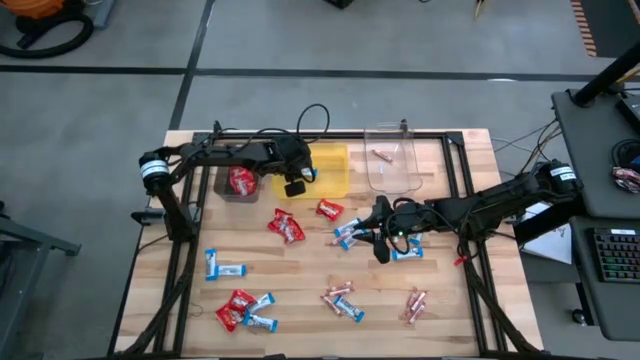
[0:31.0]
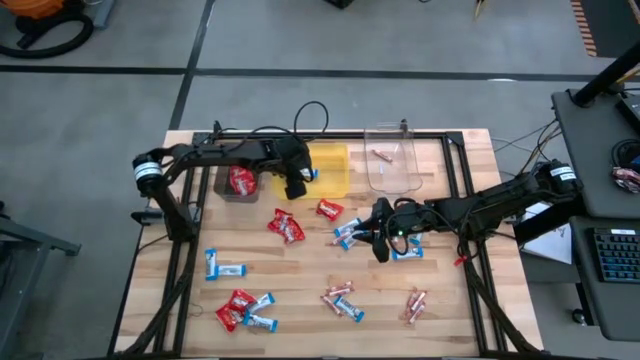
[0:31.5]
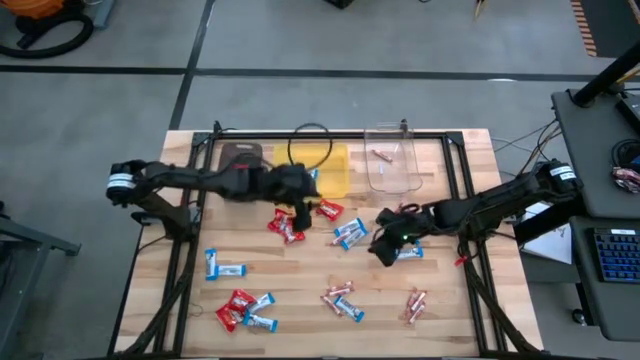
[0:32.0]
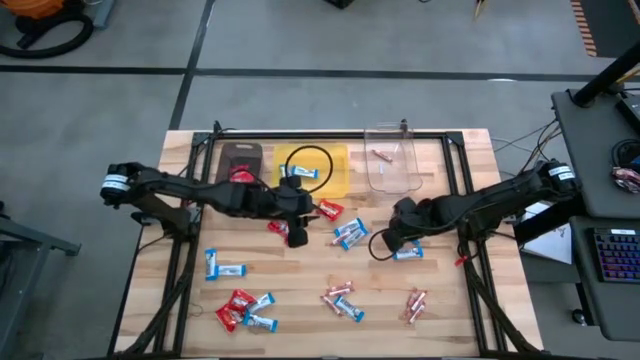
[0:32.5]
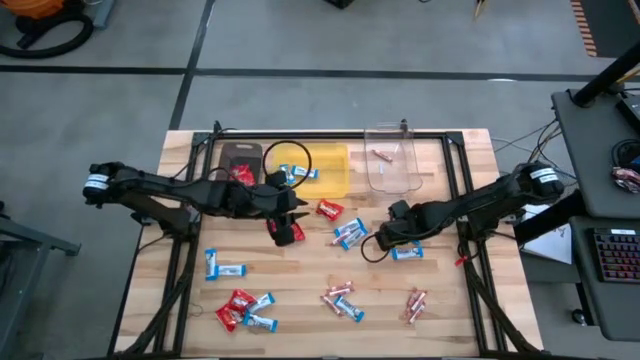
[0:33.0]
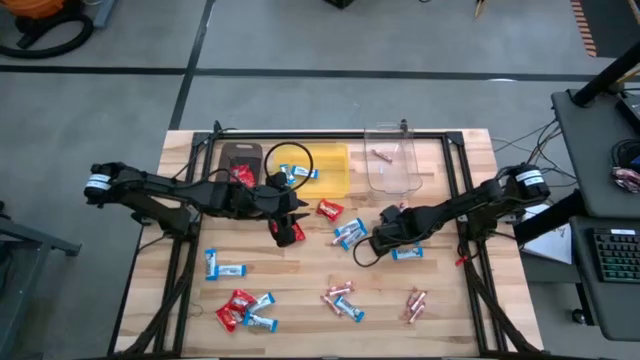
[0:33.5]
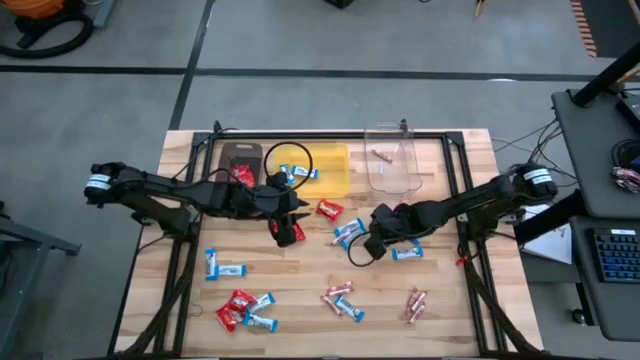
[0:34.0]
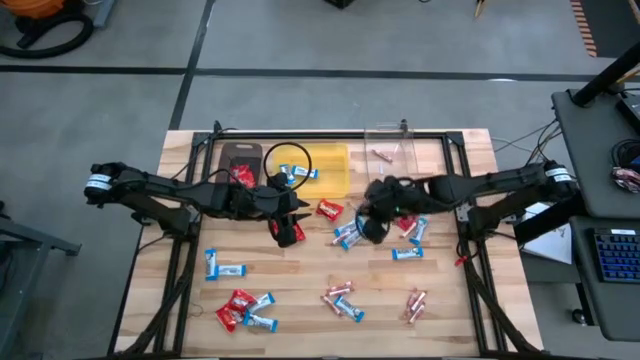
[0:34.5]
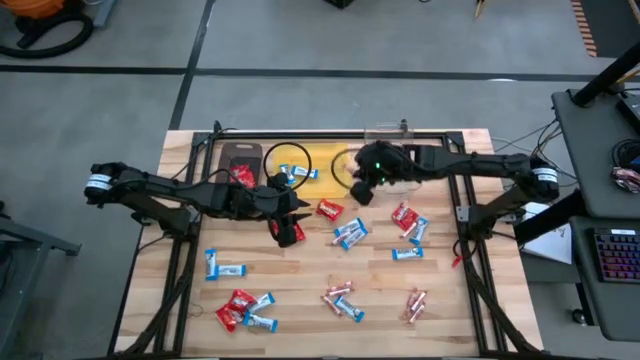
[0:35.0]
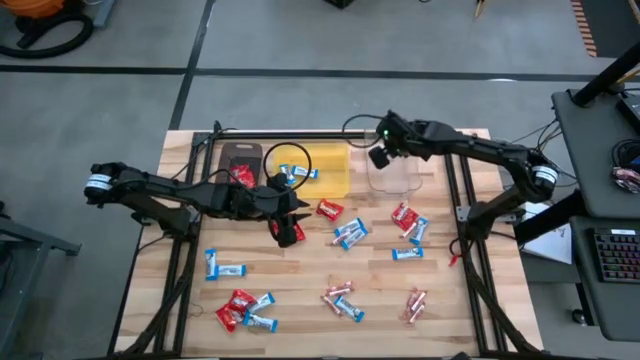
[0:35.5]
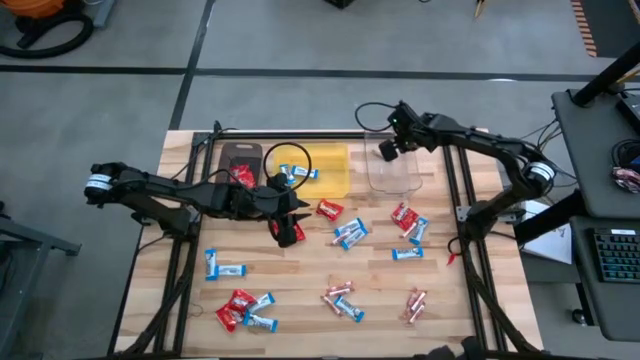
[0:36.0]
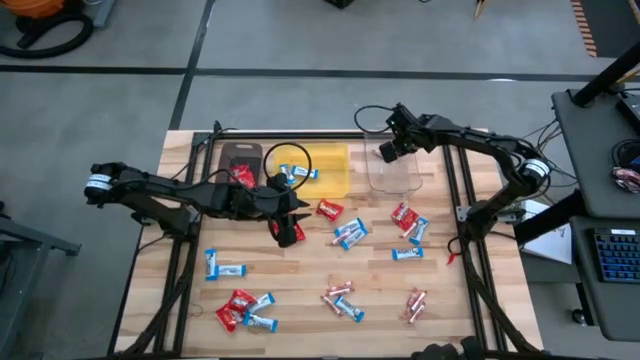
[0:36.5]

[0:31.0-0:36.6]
Task: Sort candy
Put the orange candy into the transparent bin

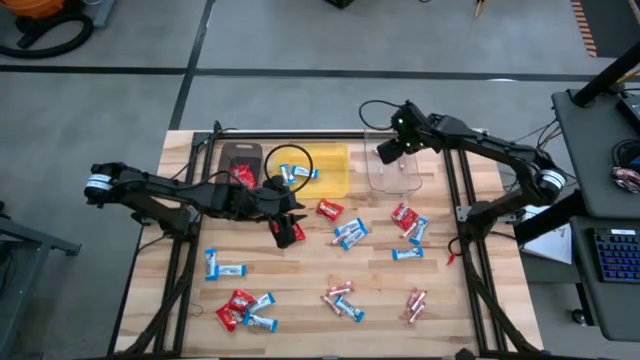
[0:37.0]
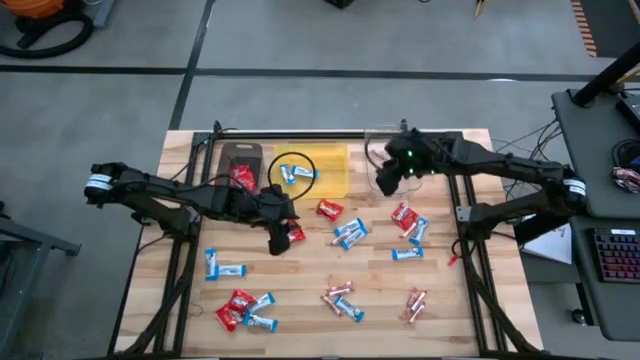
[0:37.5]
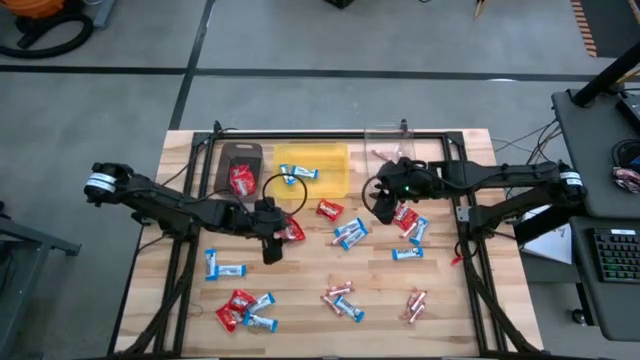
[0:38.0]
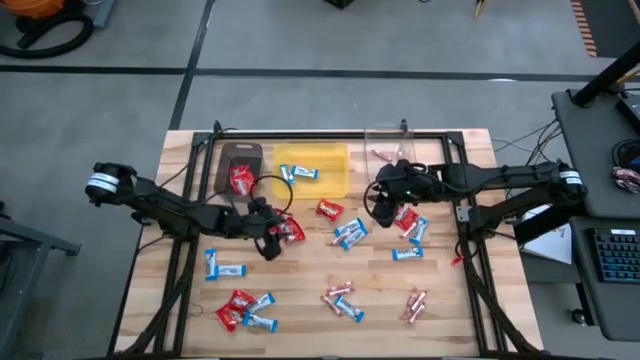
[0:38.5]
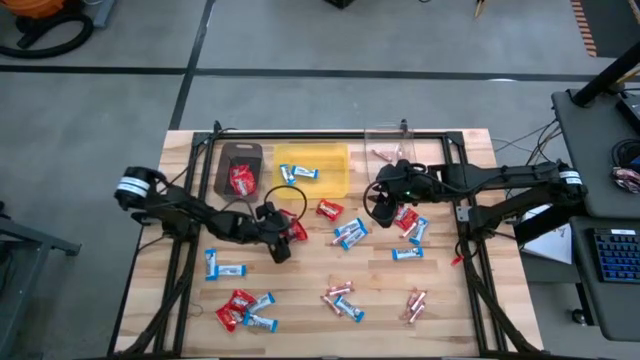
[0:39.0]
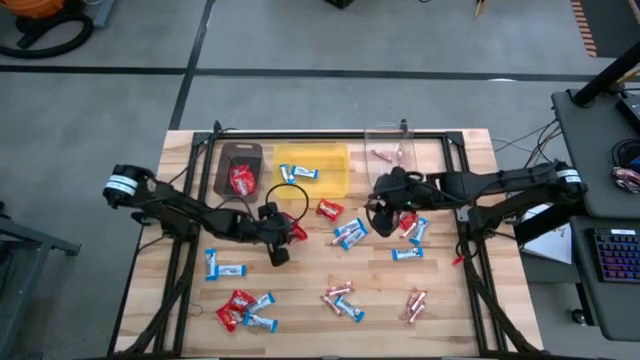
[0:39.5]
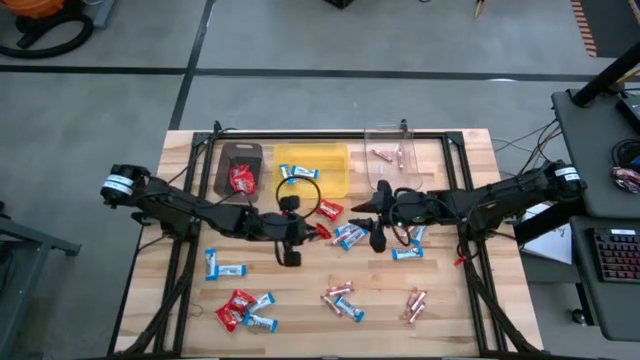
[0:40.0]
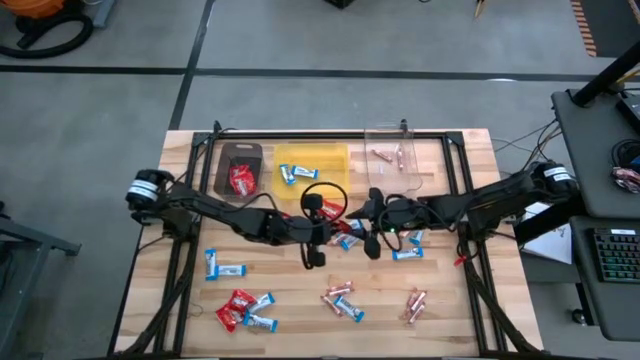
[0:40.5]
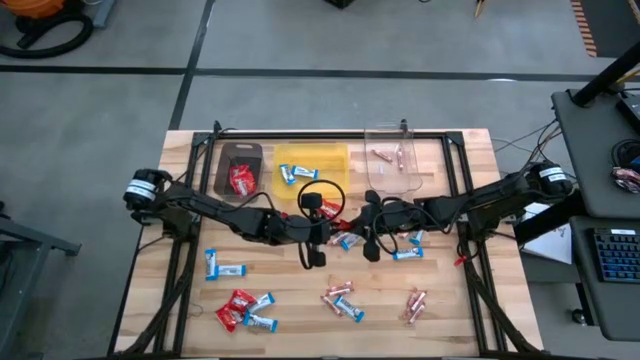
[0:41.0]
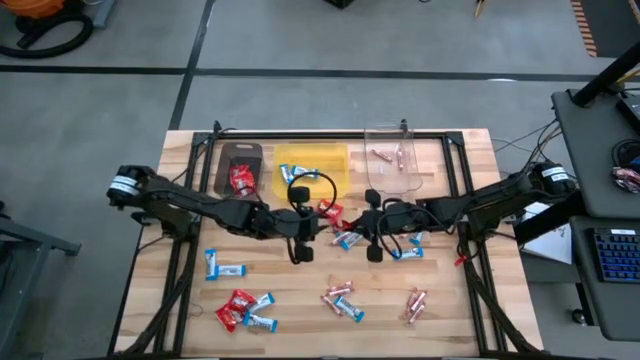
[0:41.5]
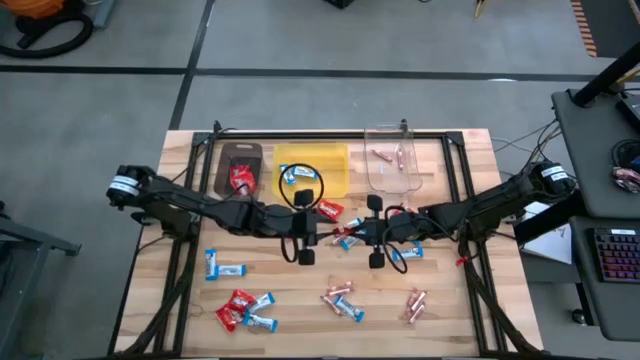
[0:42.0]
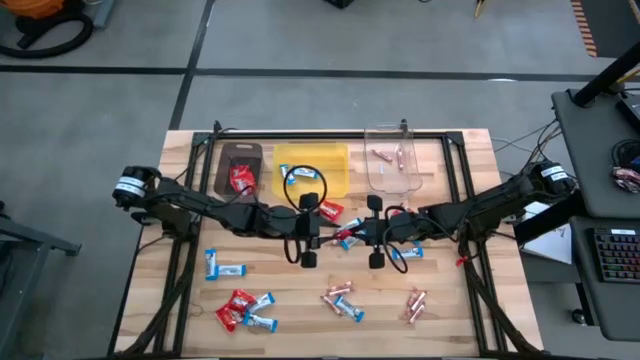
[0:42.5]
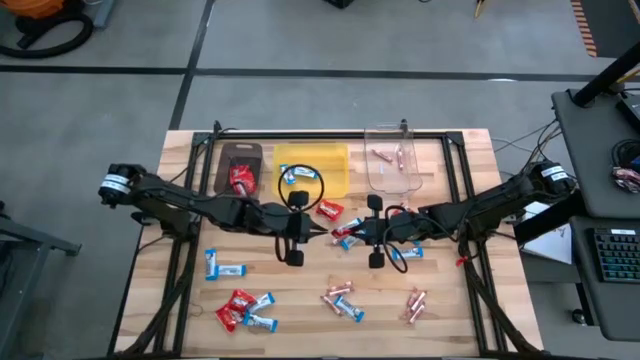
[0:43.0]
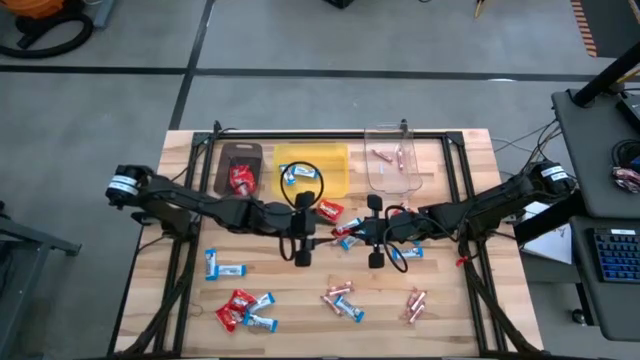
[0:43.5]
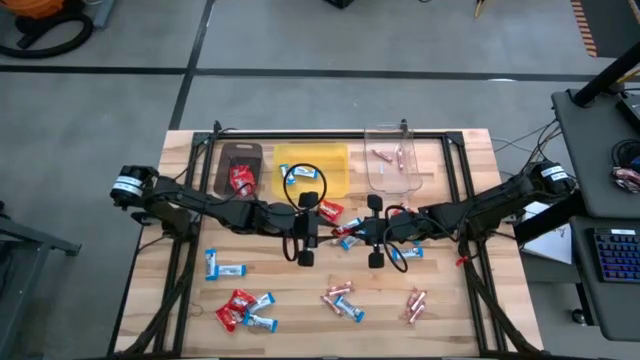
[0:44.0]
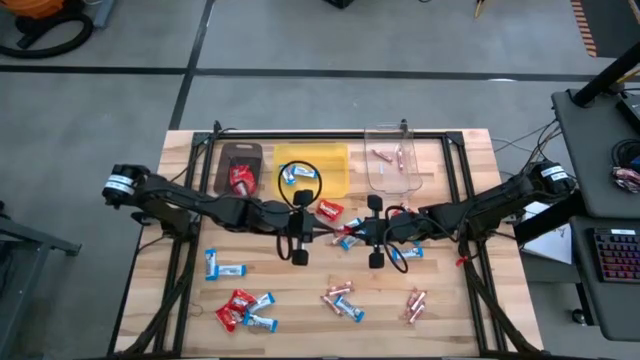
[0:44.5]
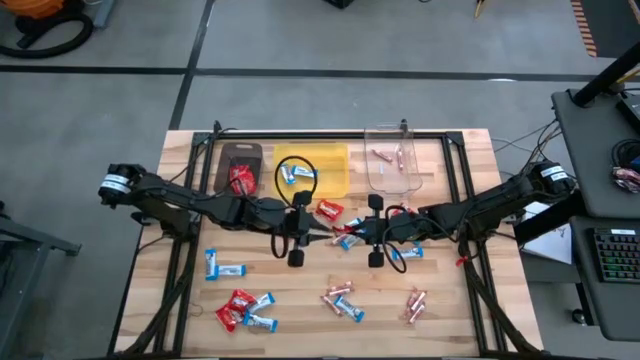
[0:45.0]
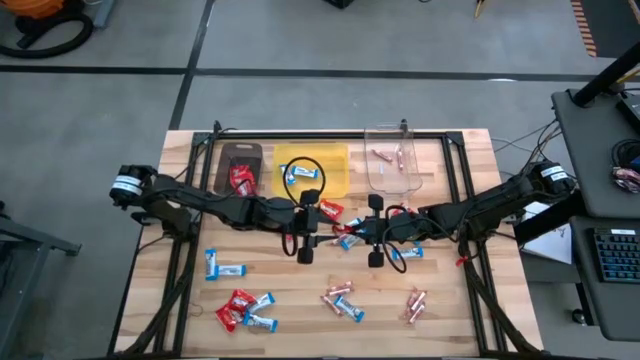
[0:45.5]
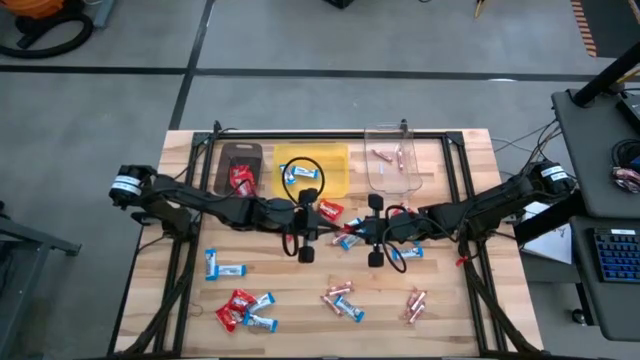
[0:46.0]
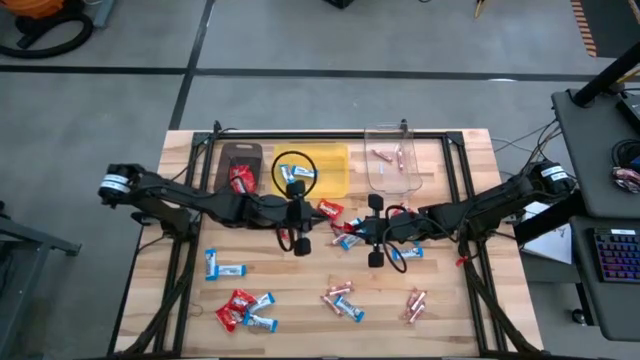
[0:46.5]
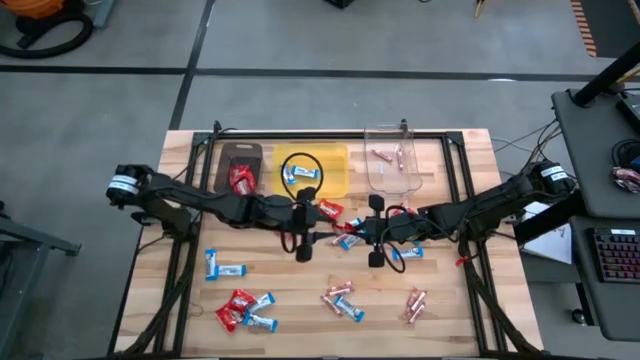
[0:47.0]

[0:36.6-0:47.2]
Put the red candy into the black bin

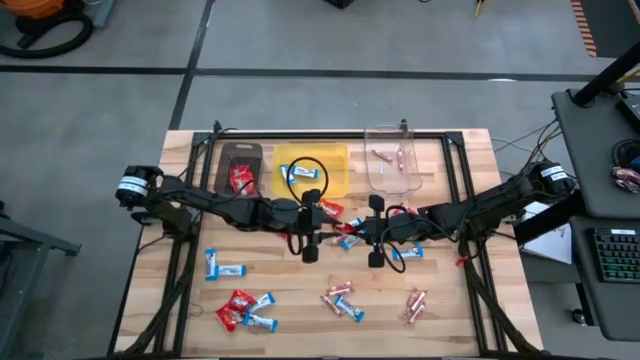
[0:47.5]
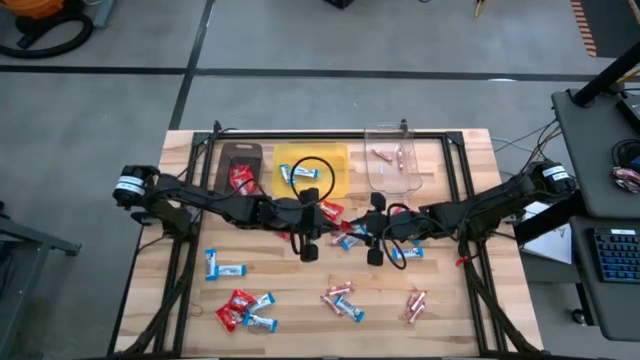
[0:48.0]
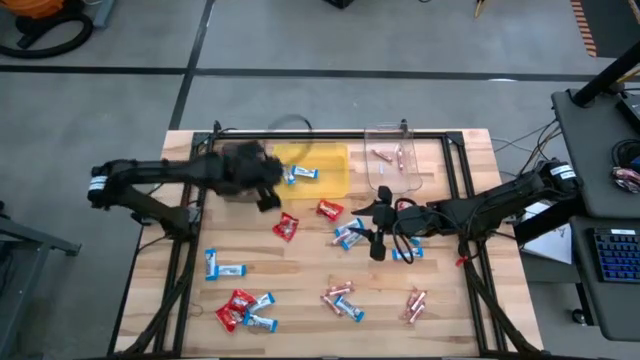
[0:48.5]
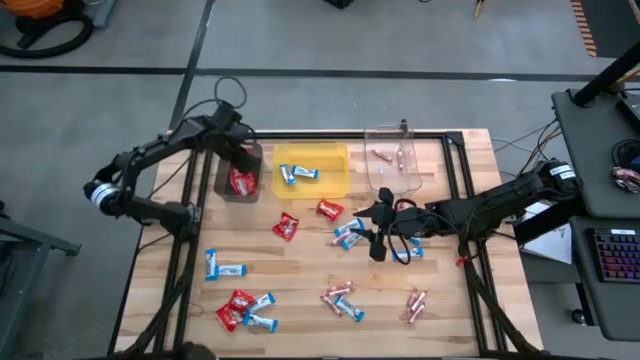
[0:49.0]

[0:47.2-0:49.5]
Put the red candy into the black bin

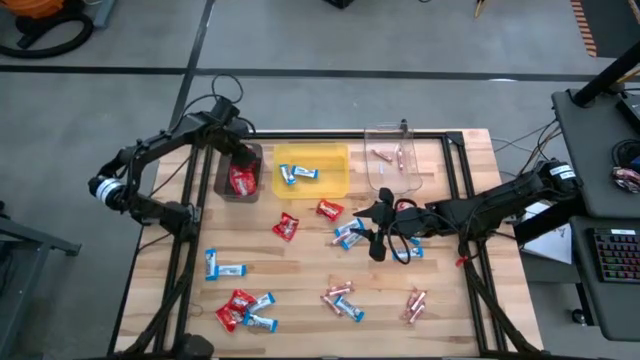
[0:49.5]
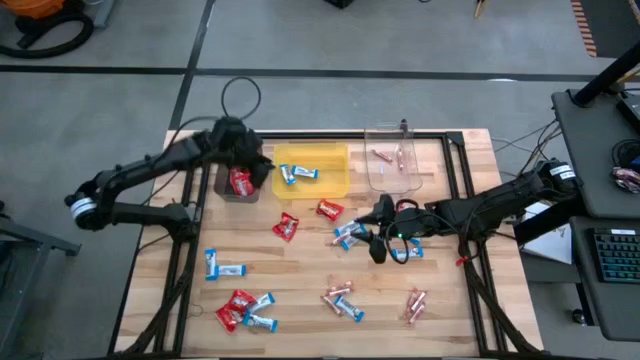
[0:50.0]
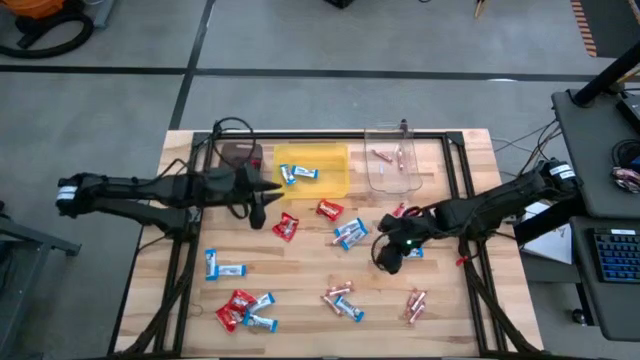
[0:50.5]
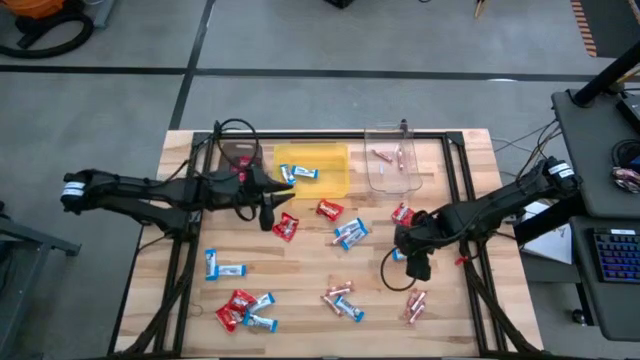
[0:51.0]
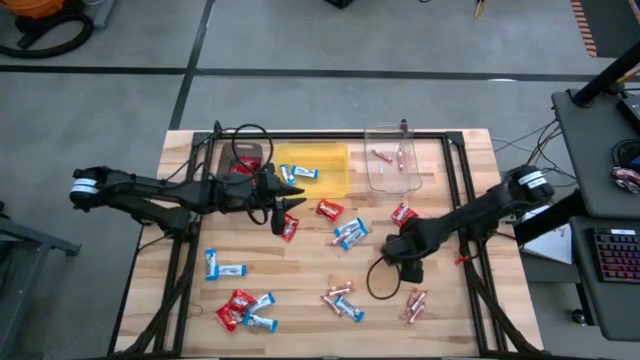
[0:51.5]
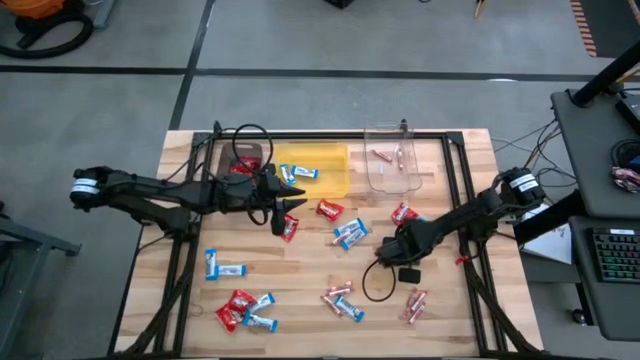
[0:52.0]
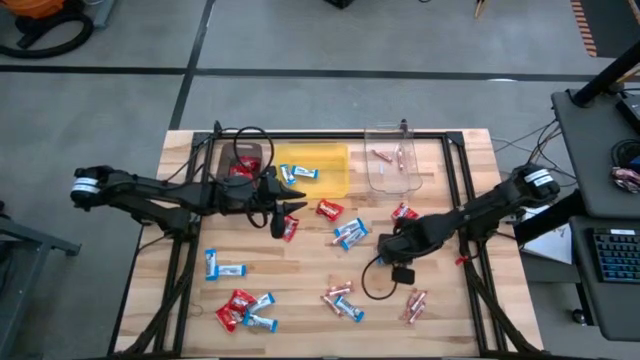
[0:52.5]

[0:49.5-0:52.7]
Put the white candy into the yellow bin
